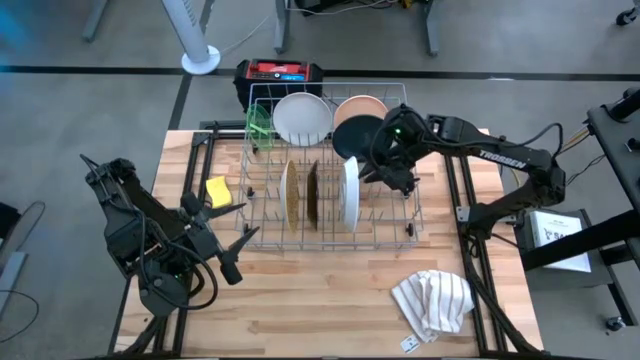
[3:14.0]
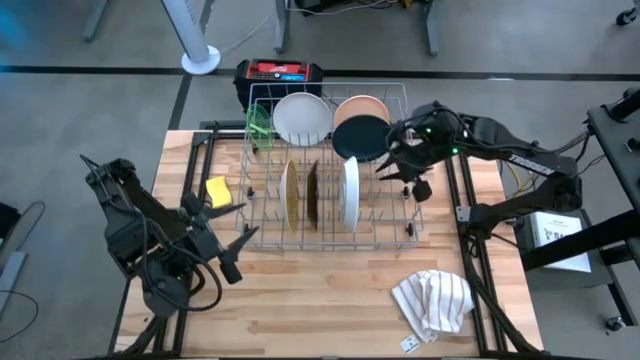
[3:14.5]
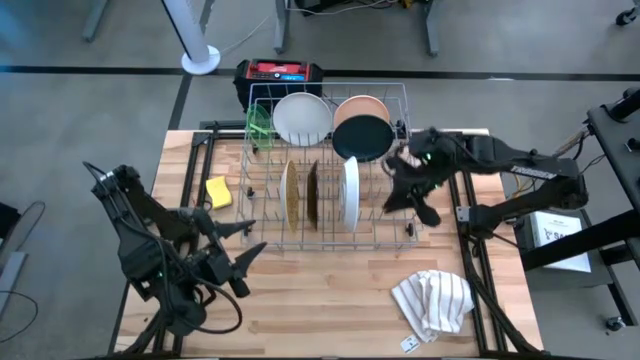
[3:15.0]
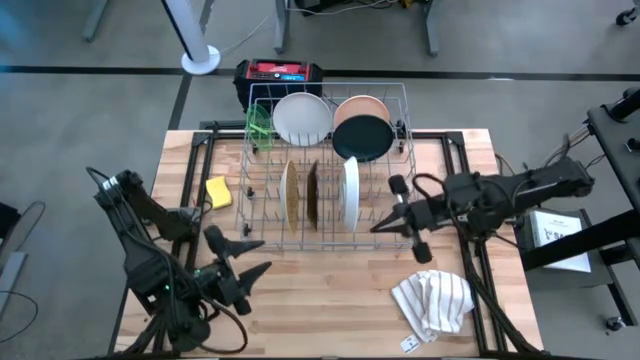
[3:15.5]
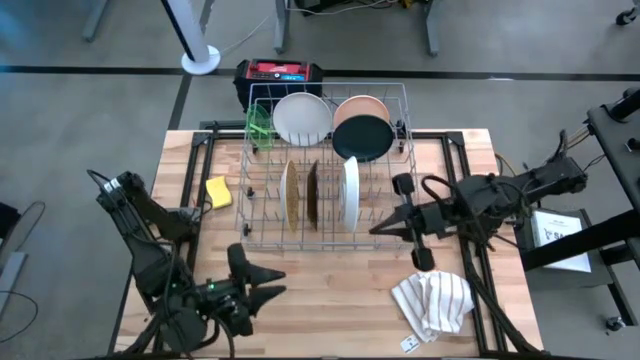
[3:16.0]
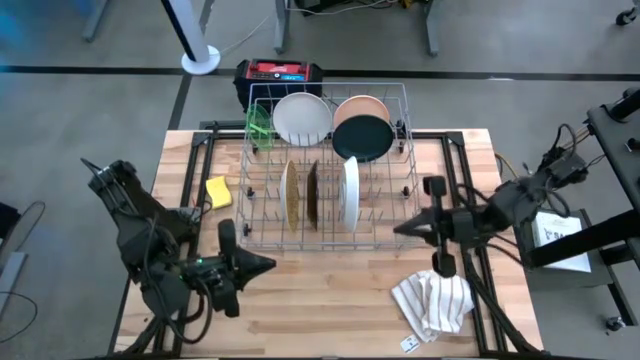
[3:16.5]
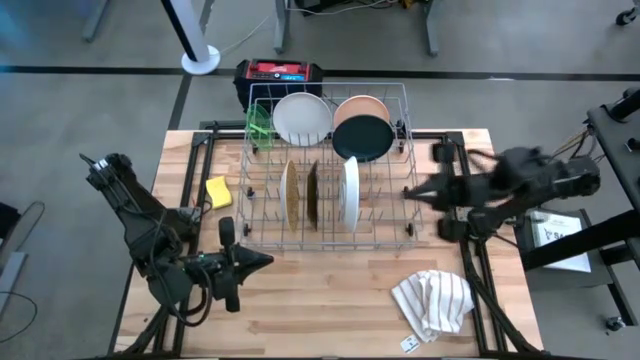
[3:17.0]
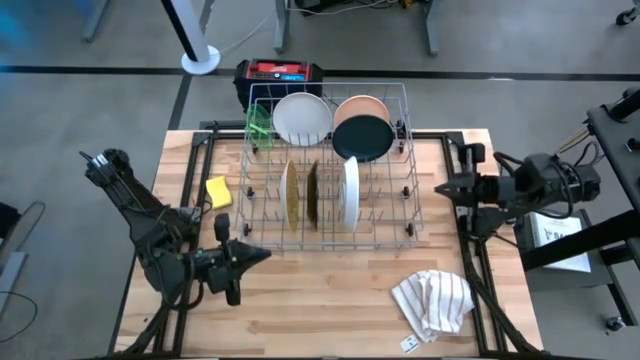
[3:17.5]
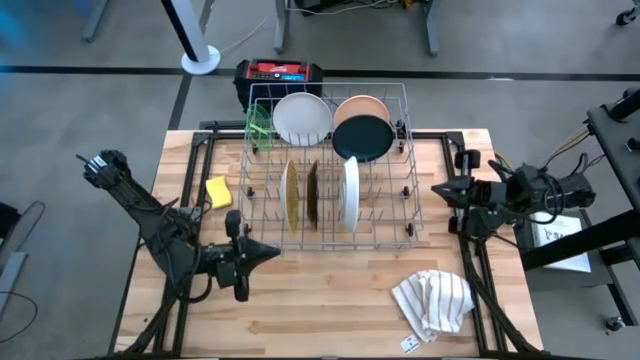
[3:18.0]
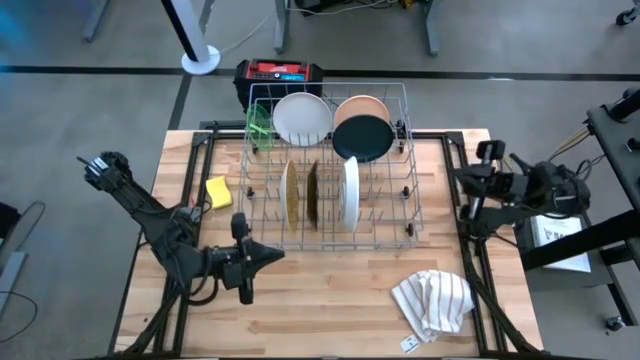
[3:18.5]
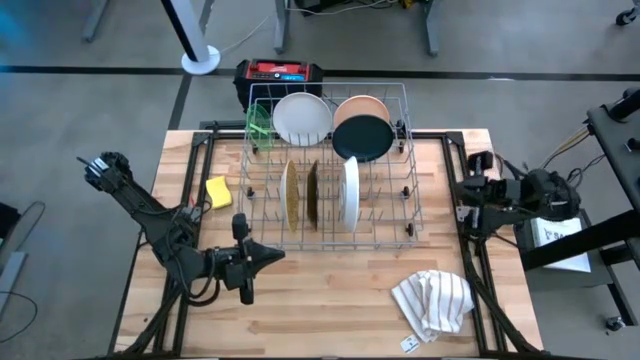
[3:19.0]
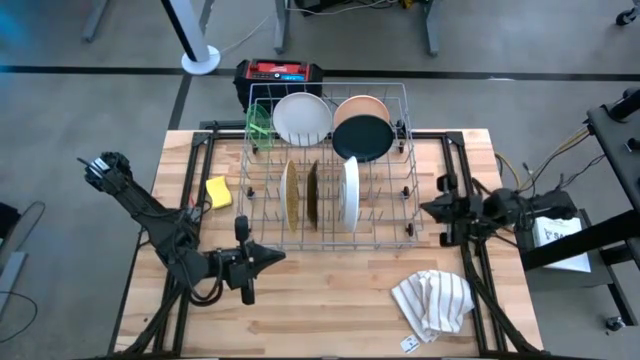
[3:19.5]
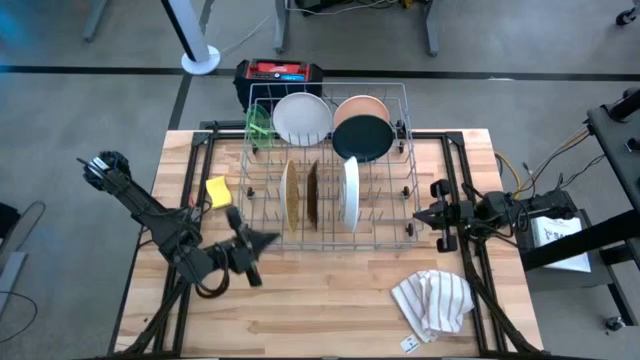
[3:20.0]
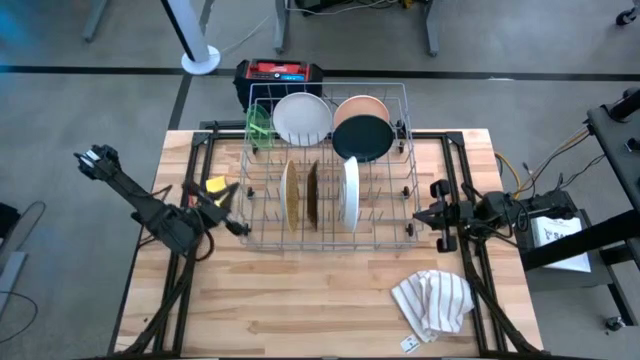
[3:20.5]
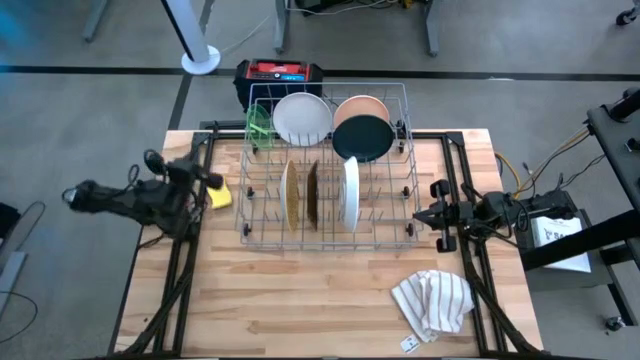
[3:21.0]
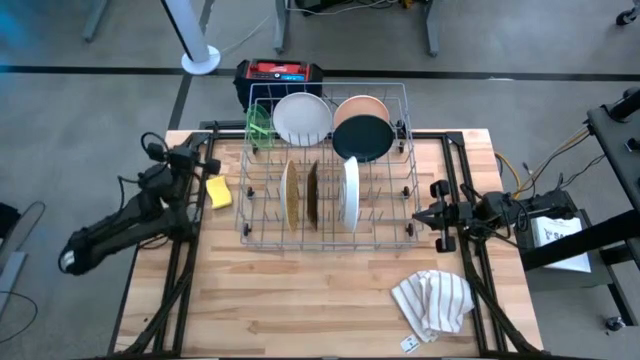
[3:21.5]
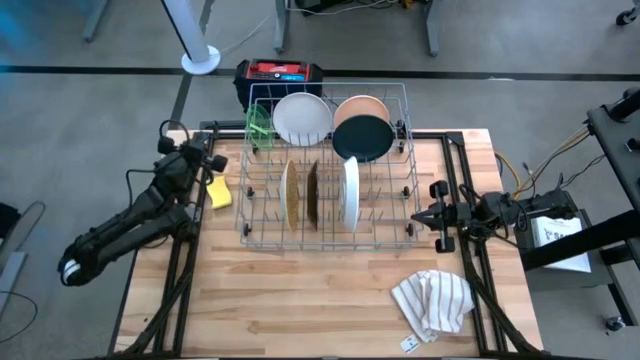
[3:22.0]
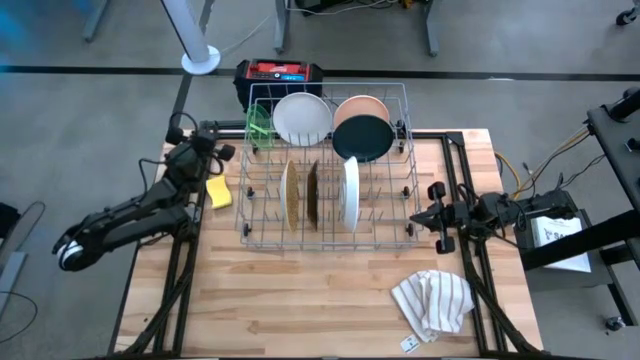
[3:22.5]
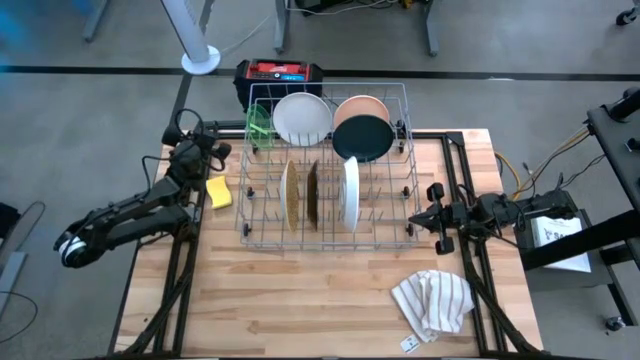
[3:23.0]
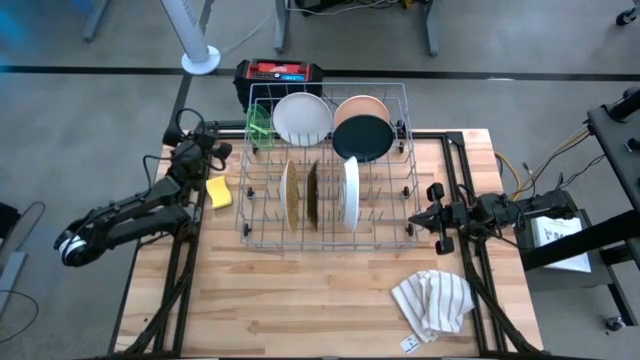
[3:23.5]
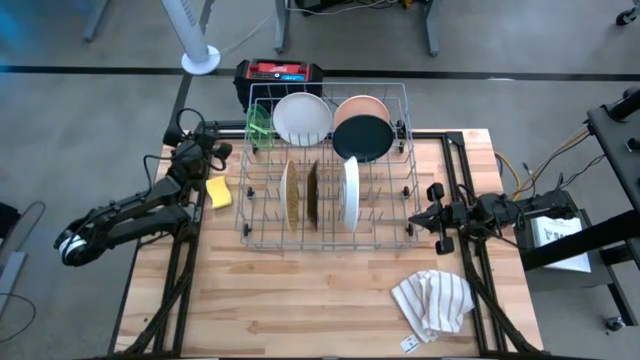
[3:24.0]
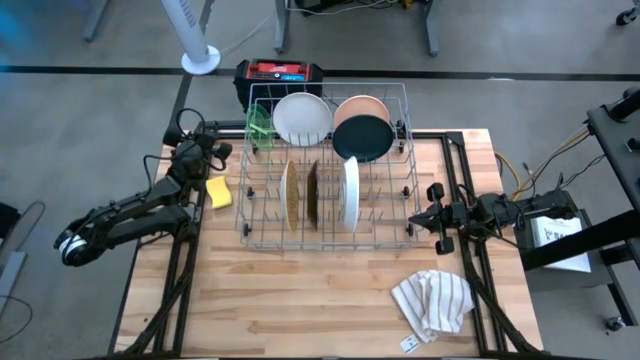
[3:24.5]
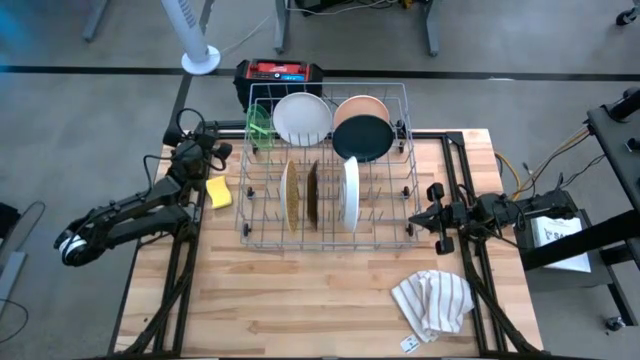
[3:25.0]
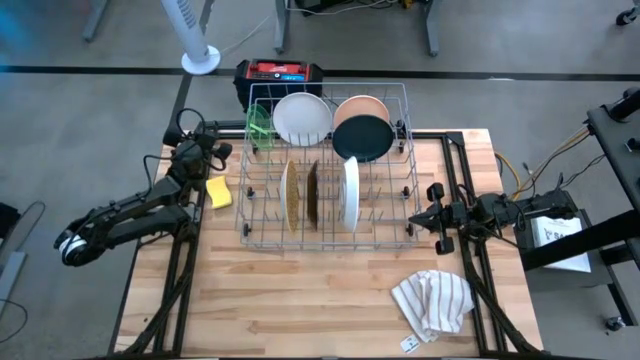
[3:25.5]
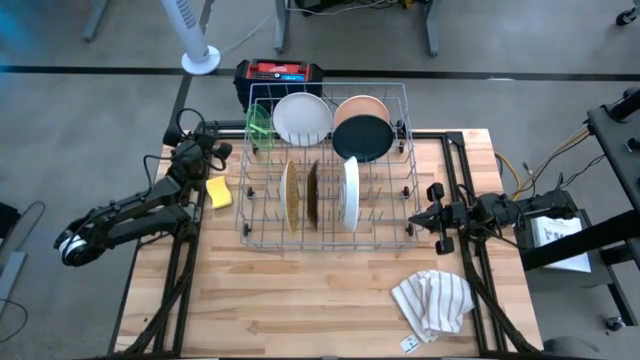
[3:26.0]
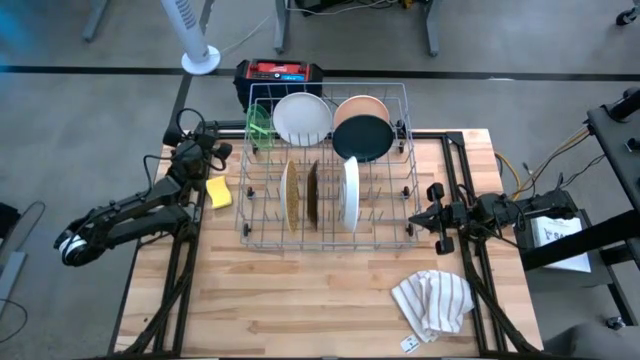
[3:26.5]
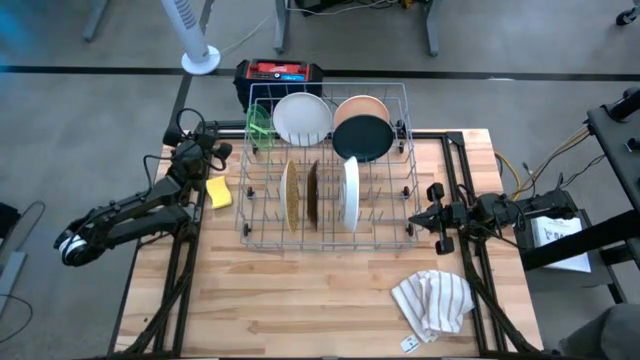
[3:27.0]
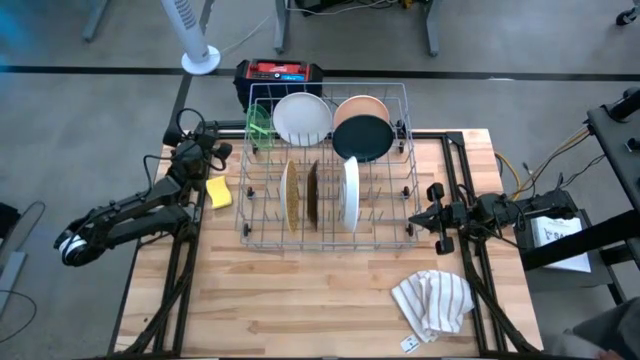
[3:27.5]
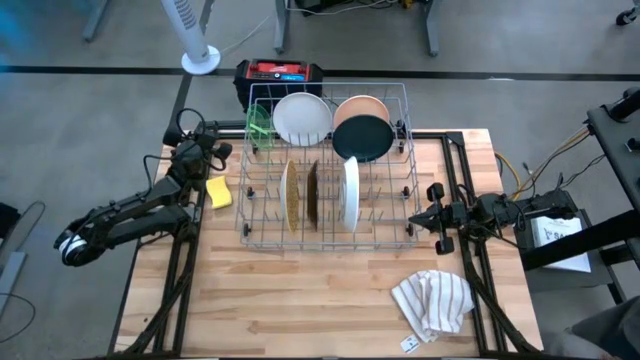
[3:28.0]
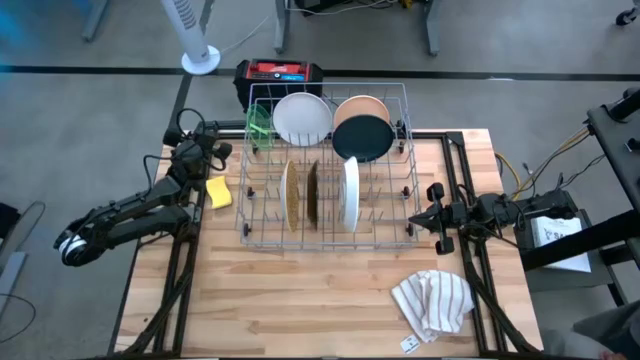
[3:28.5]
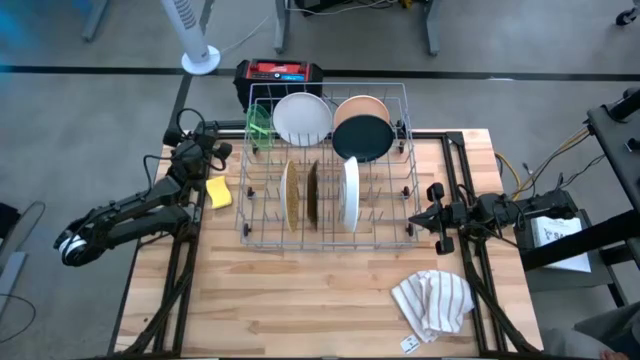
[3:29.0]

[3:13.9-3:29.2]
Task: Sort dishes
Return to Home Position

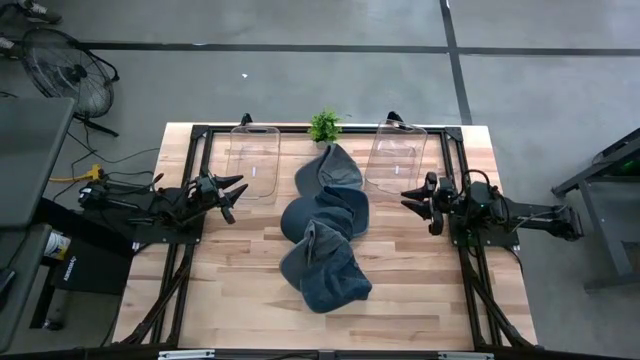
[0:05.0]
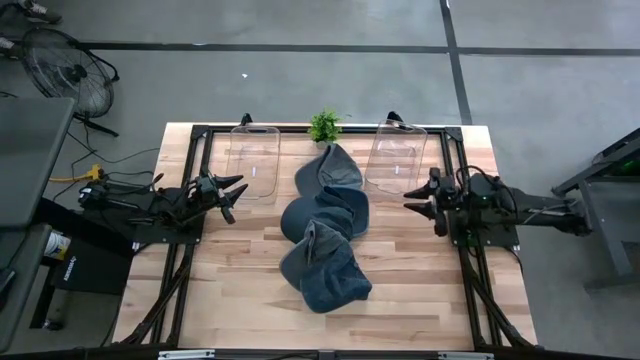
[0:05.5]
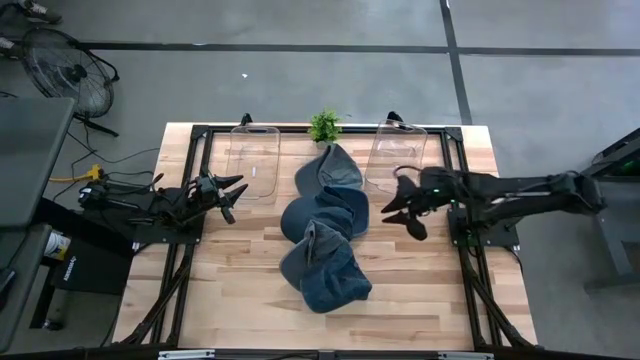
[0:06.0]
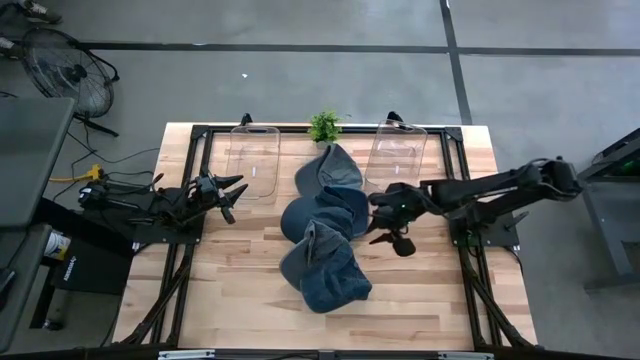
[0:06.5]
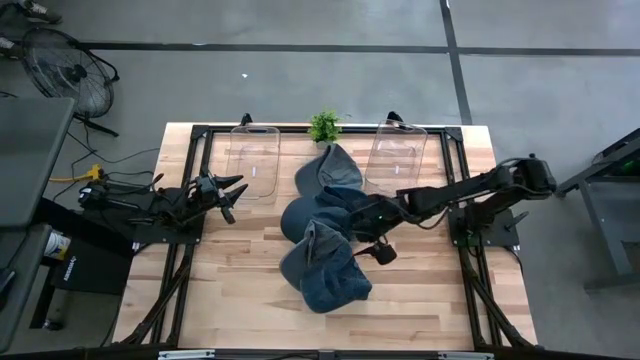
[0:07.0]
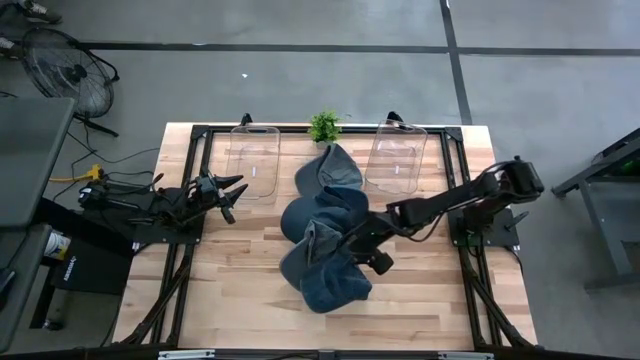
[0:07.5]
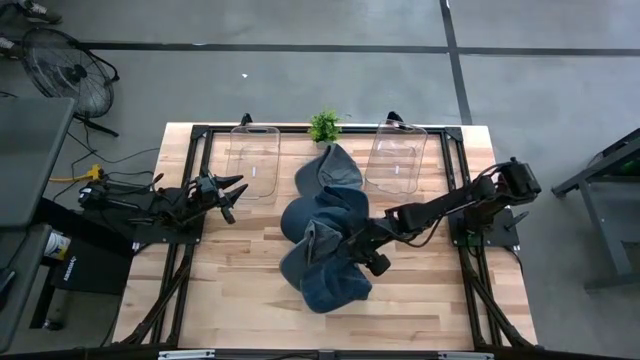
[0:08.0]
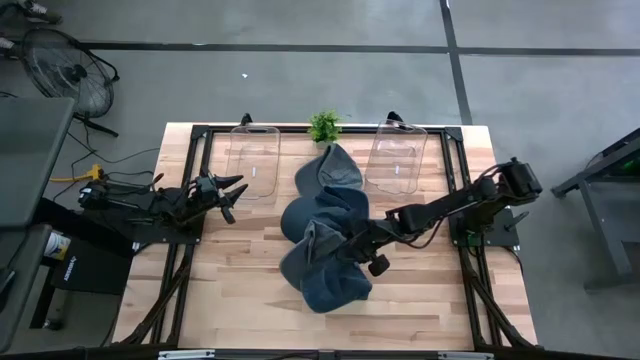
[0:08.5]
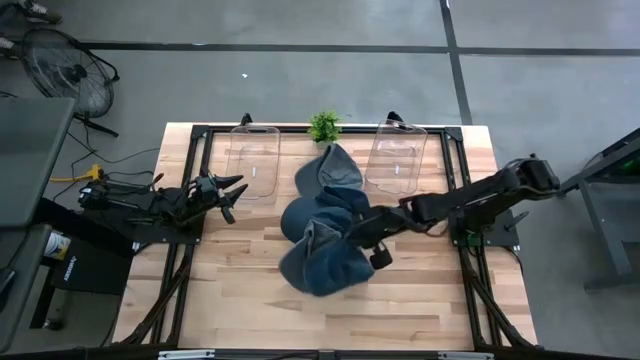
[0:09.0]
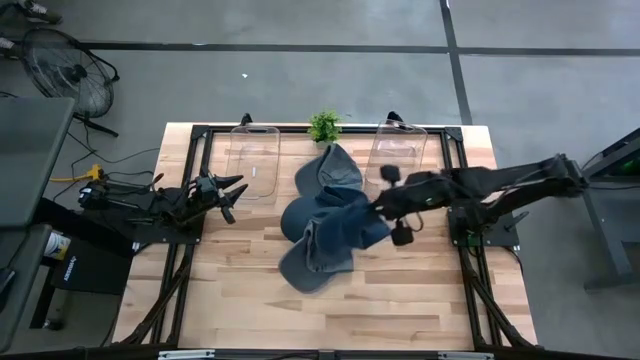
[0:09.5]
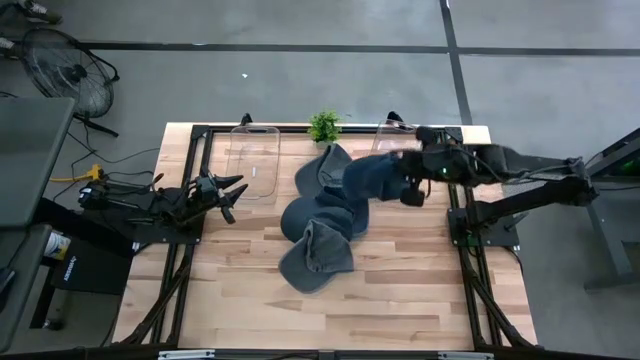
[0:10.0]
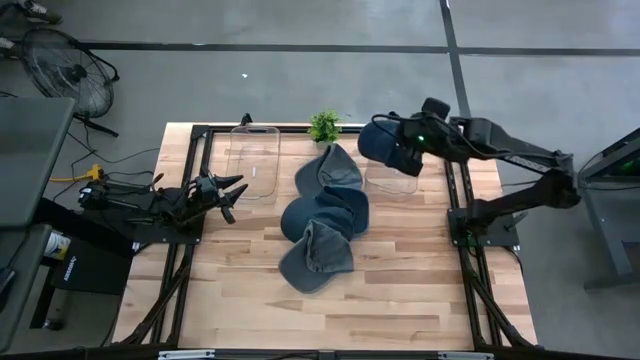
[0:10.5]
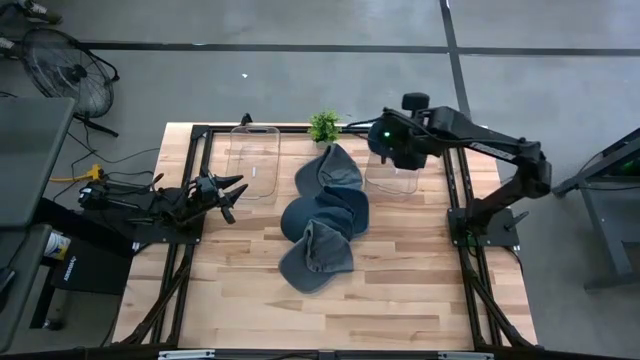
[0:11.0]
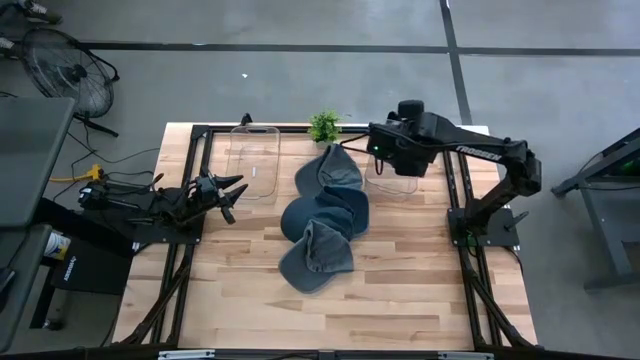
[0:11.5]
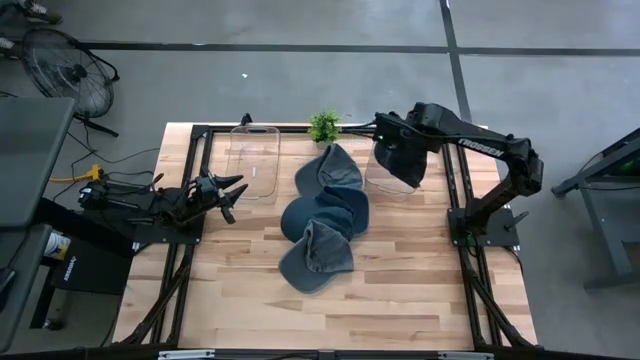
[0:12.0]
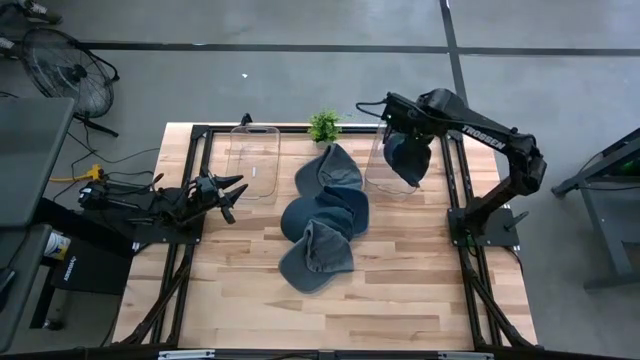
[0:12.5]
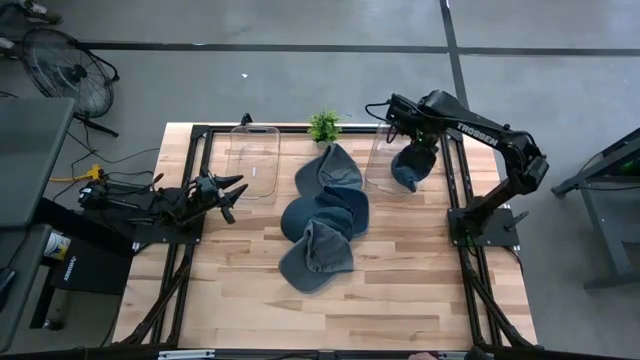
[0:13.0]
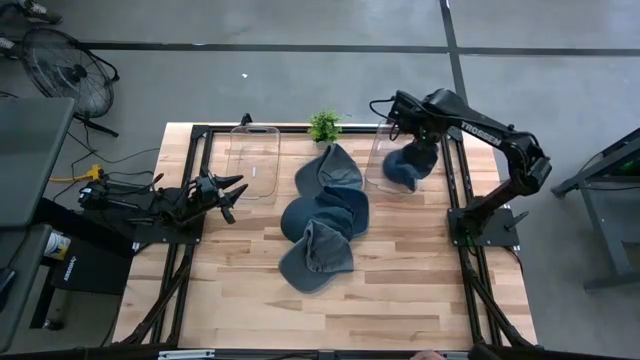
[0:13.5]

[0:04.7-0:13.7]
Task: Pick & Place hat
Put the bottom blue cap into the right transparent bin
